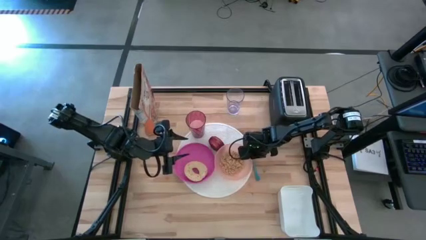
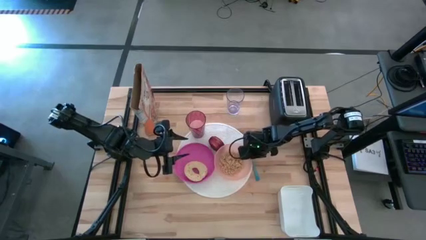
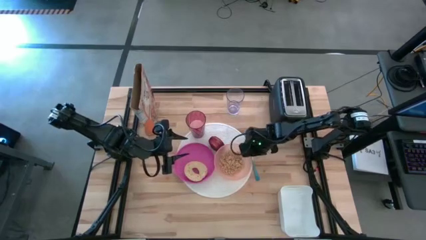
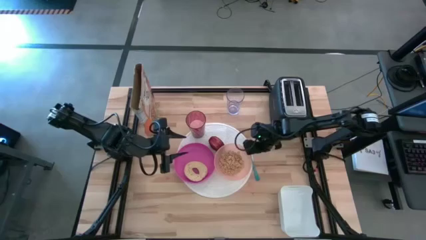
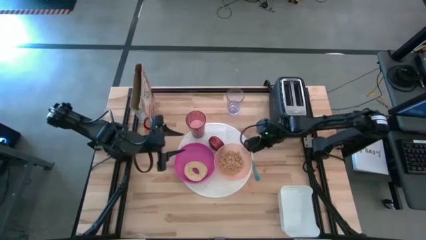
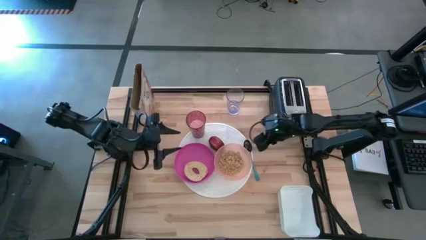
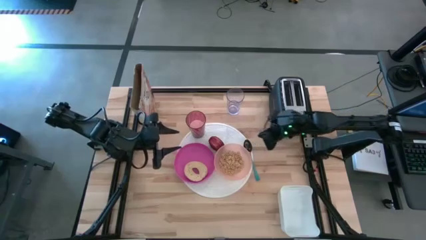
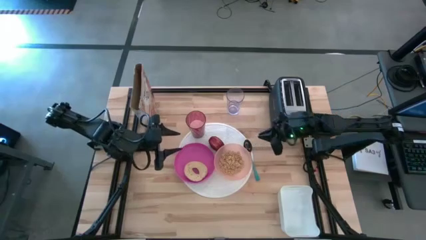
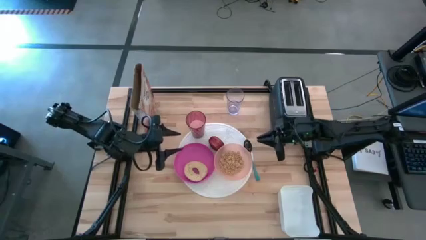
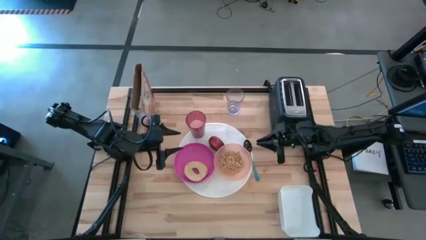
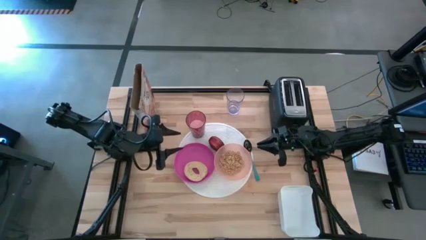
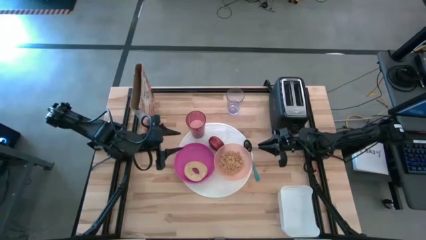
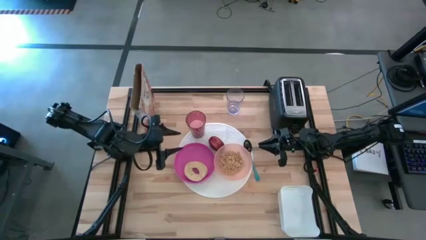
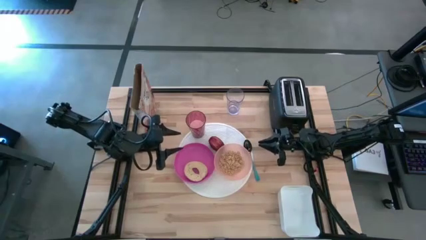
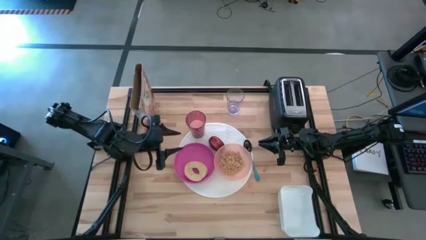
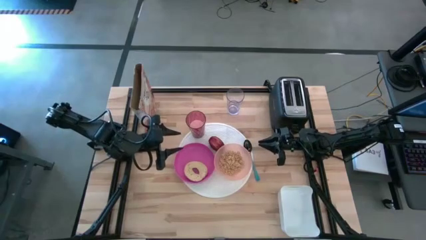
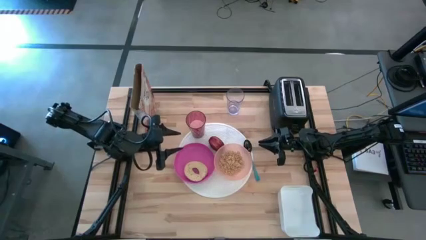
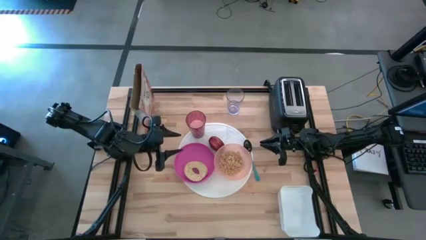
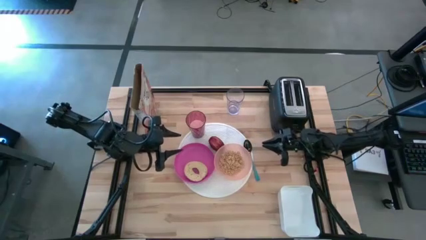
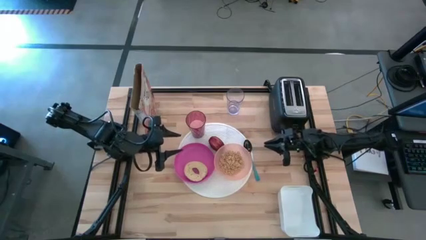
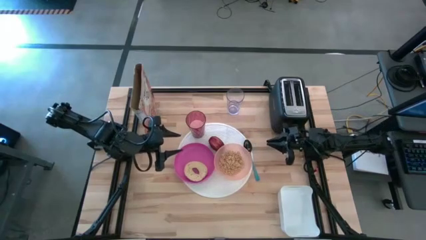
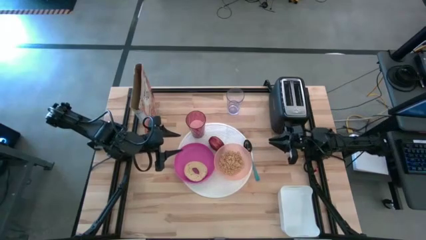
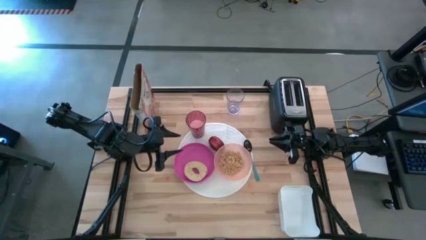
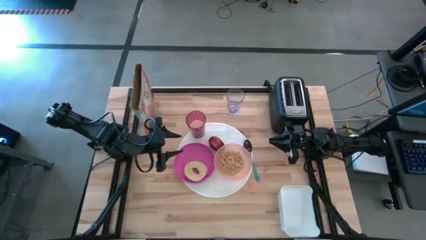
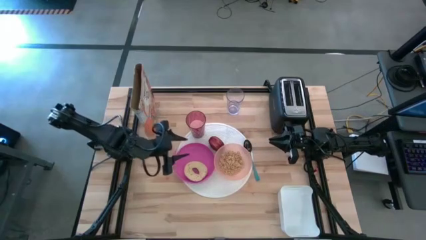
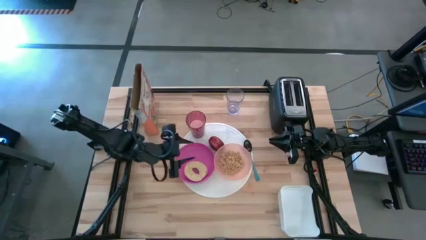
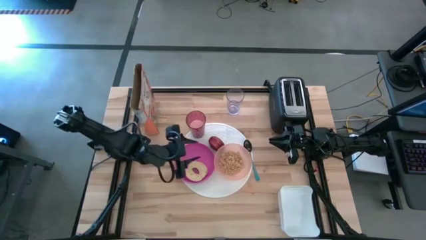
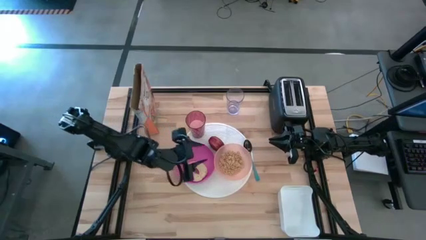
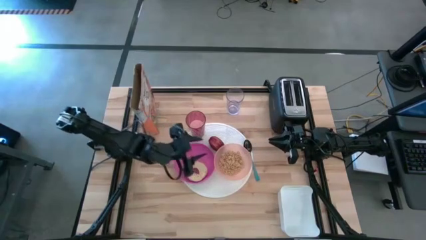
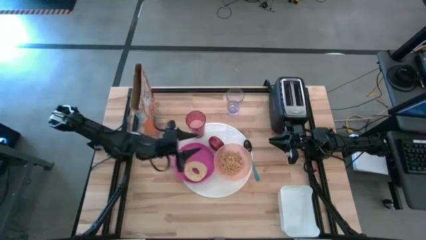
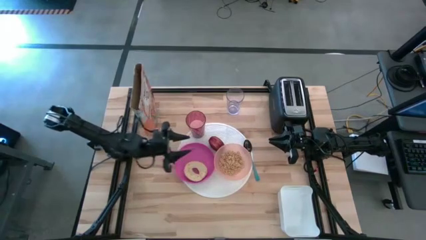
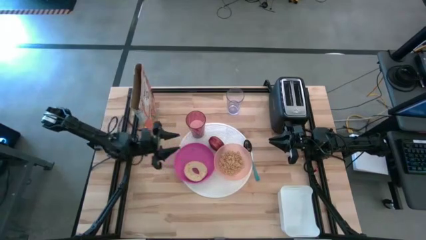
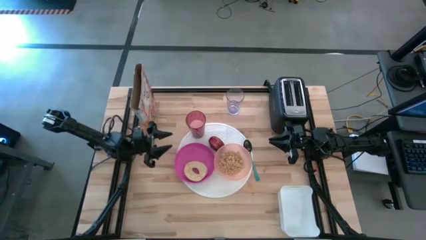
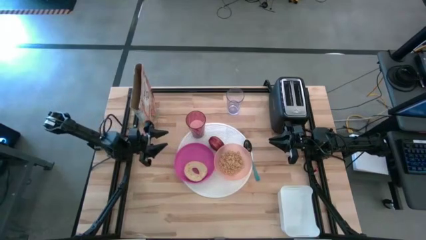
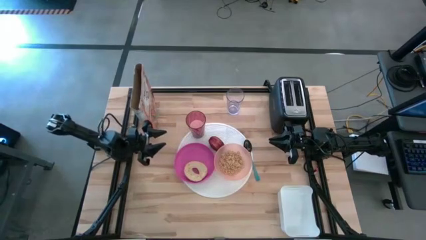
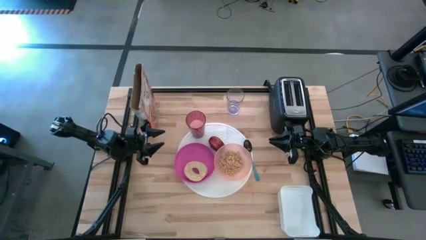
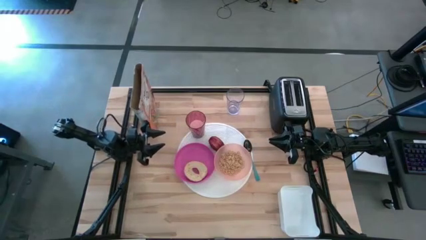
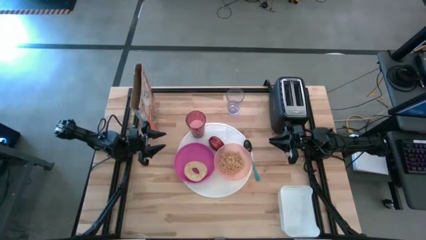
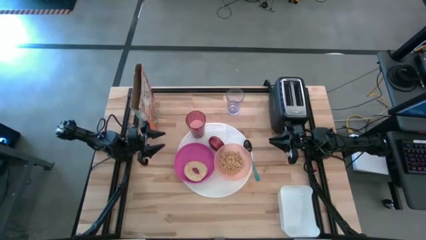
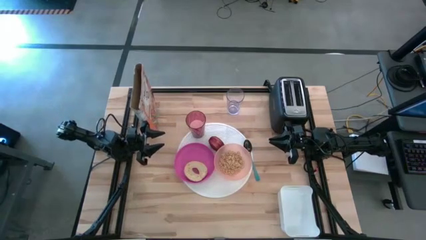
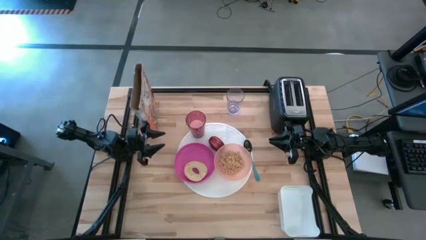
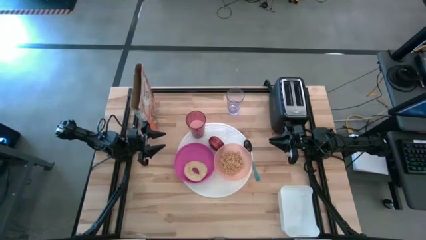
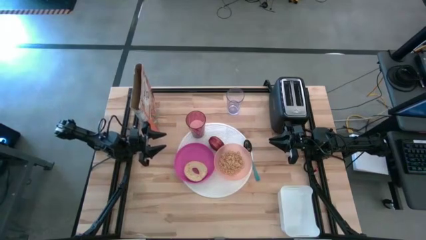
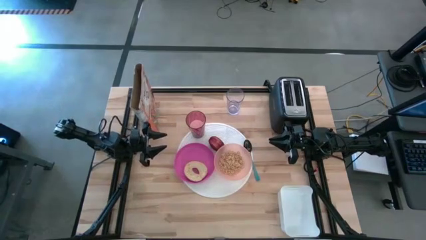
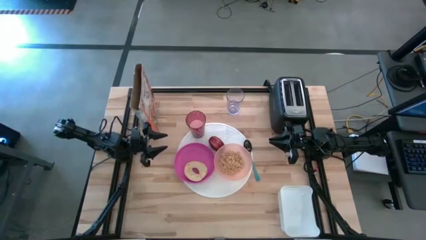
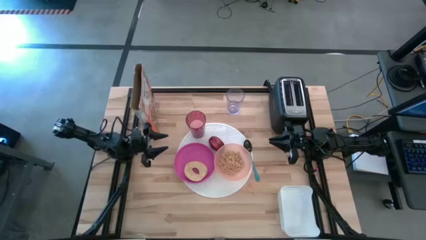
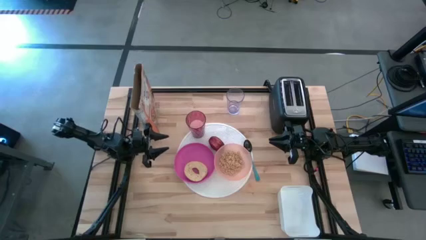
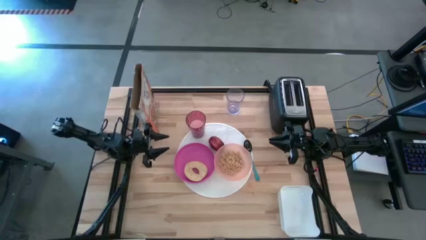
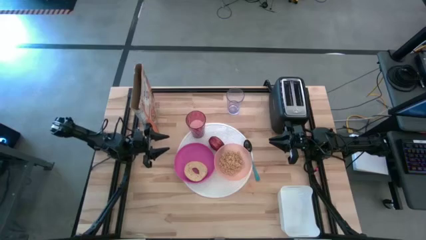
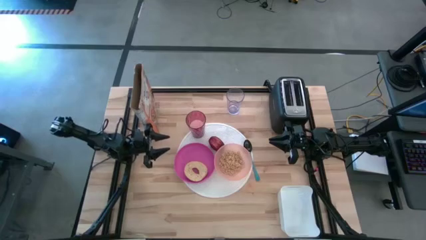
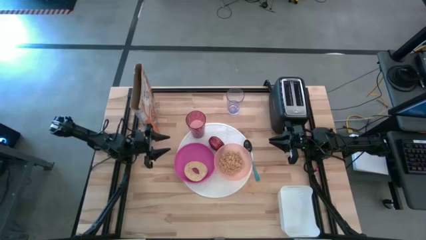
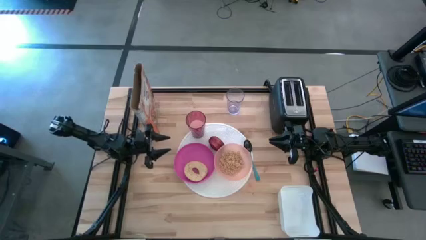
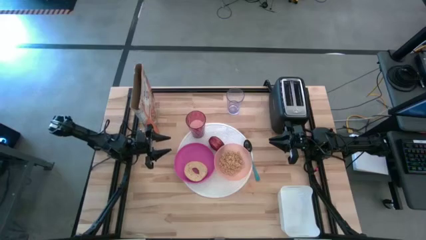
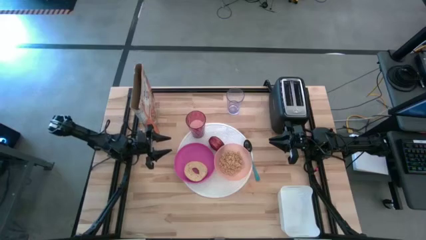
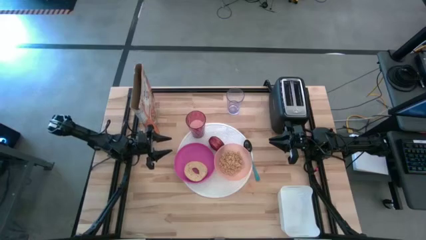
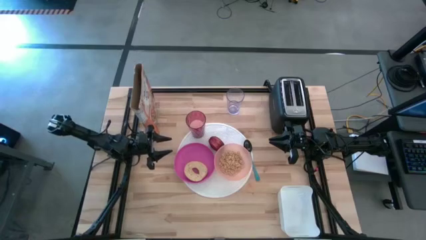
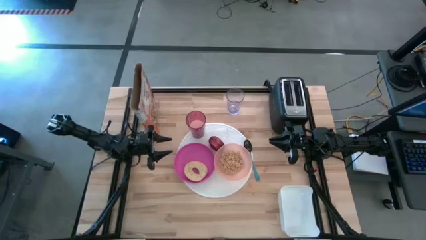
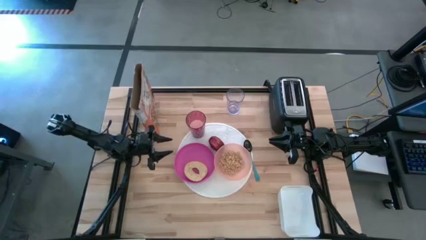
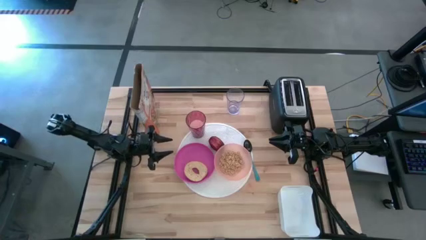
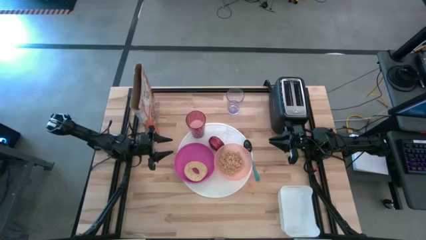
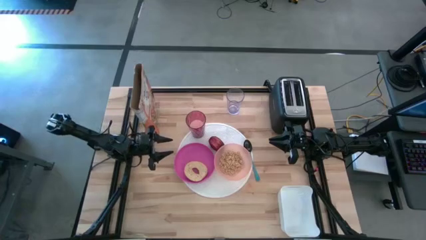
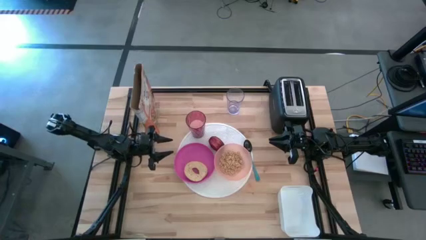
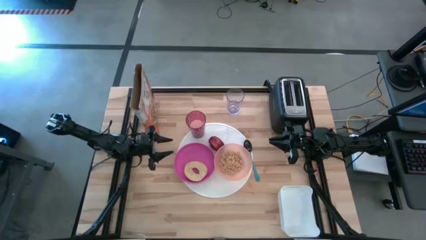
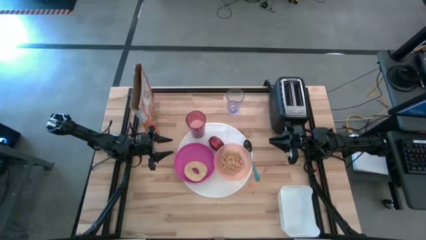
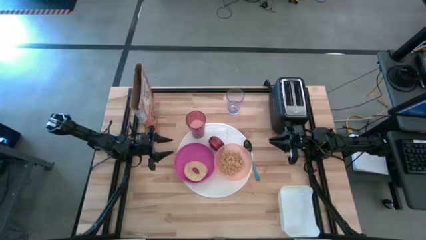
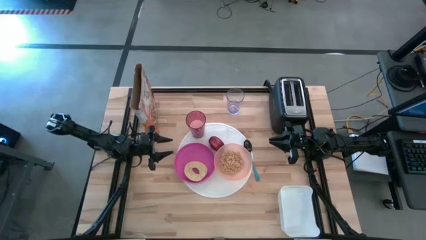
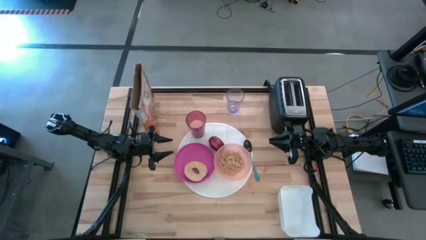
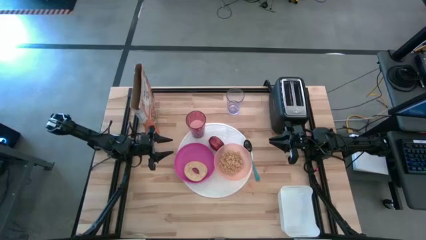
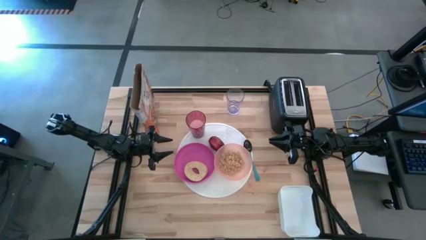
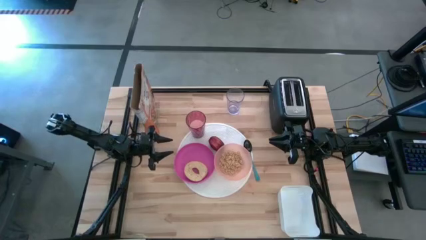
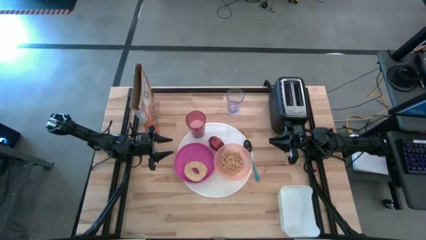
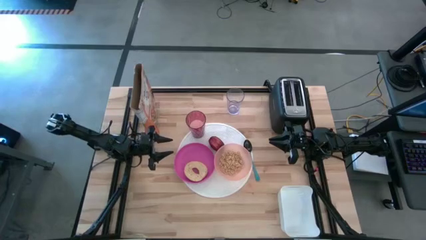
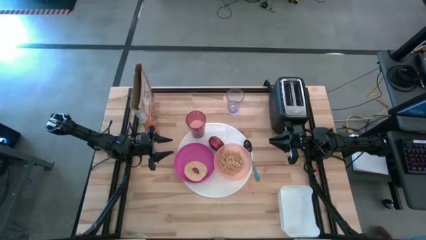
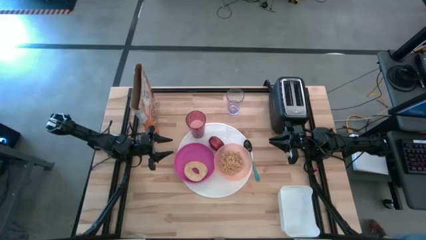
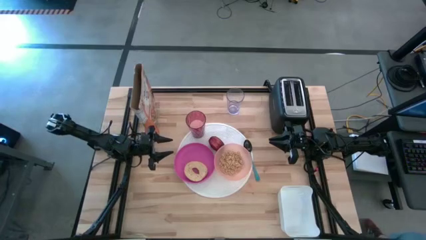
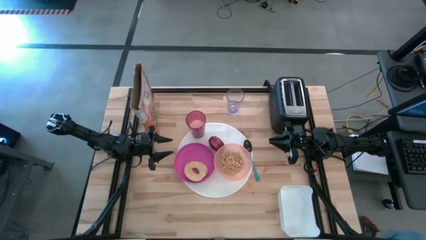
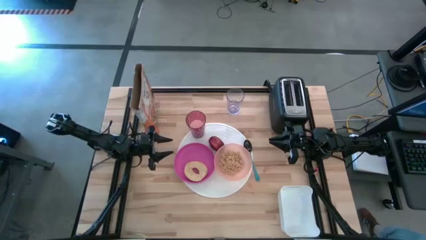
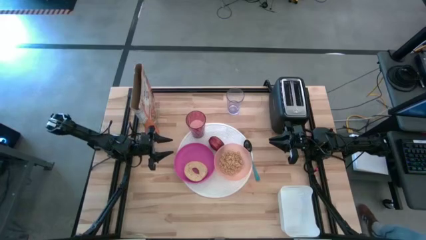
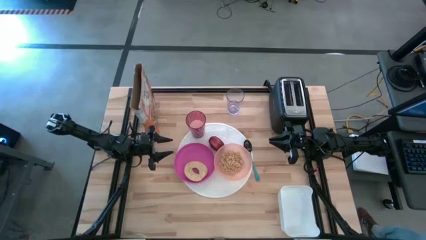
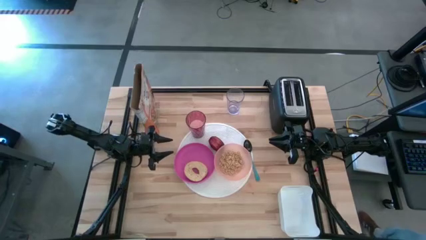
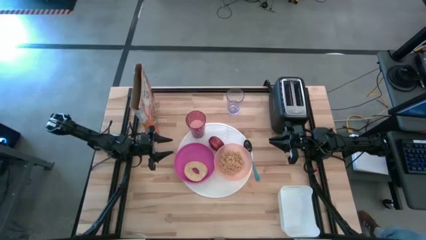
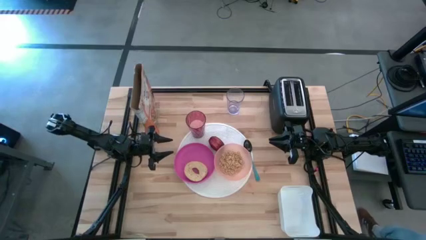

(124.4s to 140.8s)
Task: Arrange a breakfast setting
Return to Home Position
